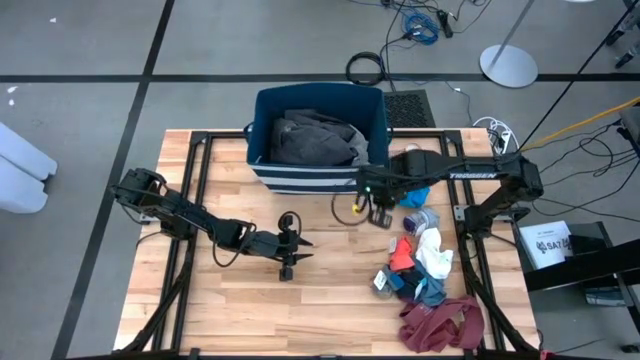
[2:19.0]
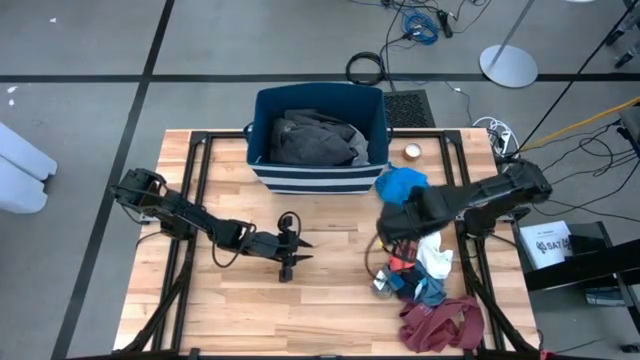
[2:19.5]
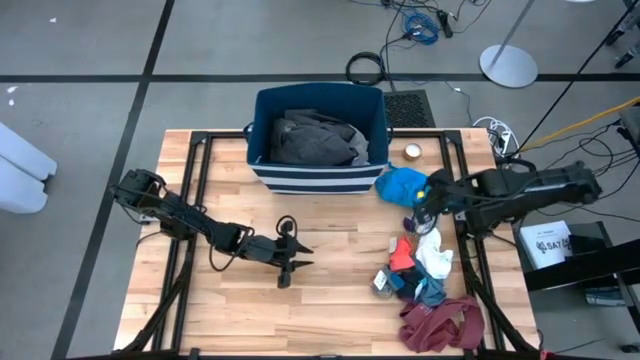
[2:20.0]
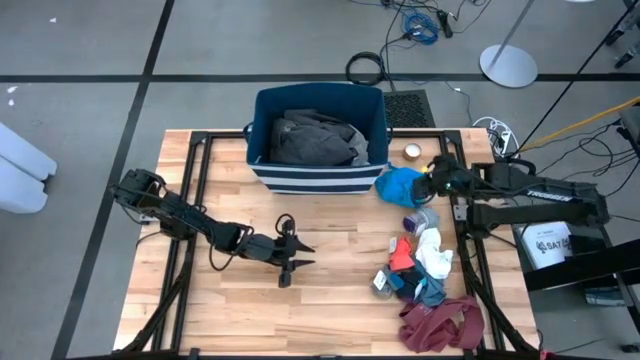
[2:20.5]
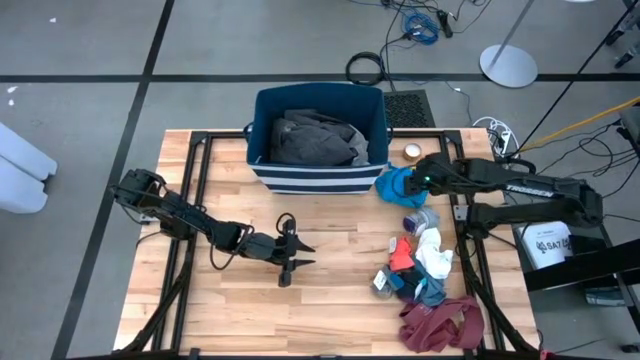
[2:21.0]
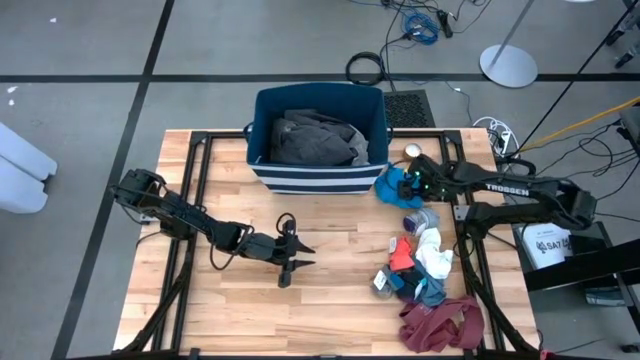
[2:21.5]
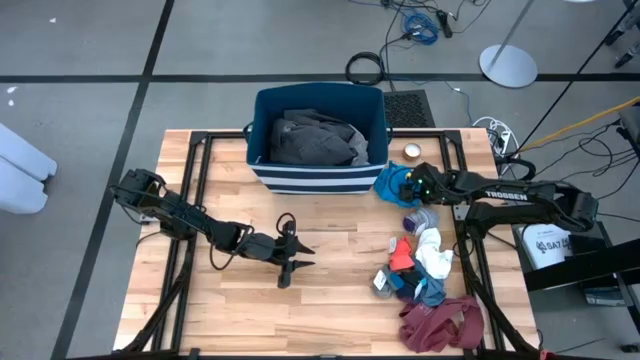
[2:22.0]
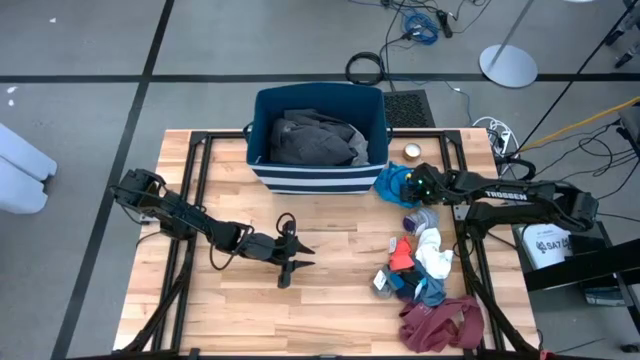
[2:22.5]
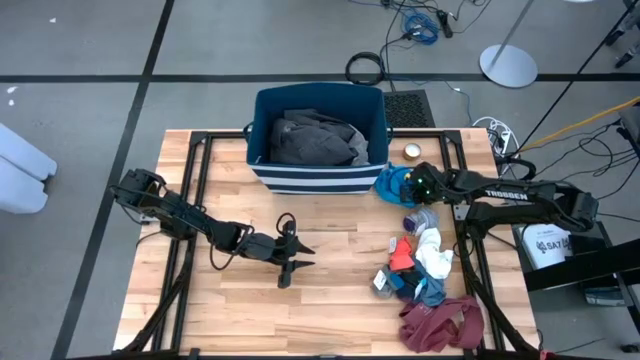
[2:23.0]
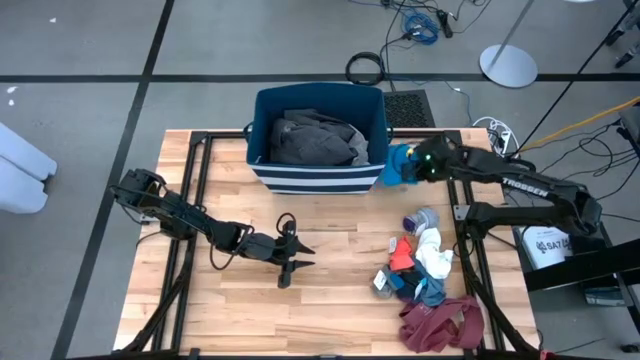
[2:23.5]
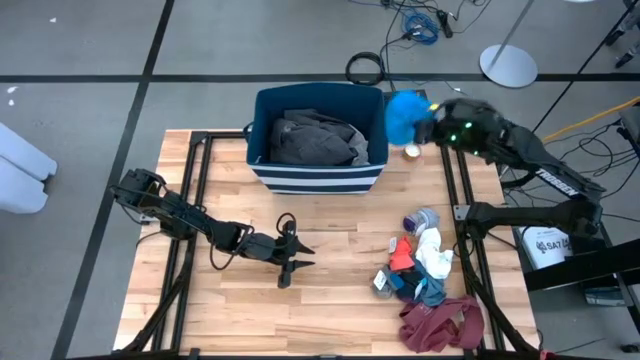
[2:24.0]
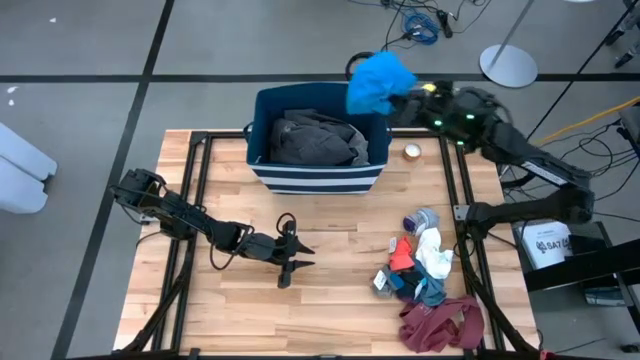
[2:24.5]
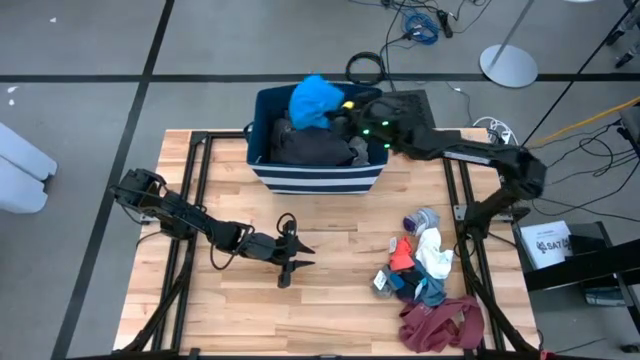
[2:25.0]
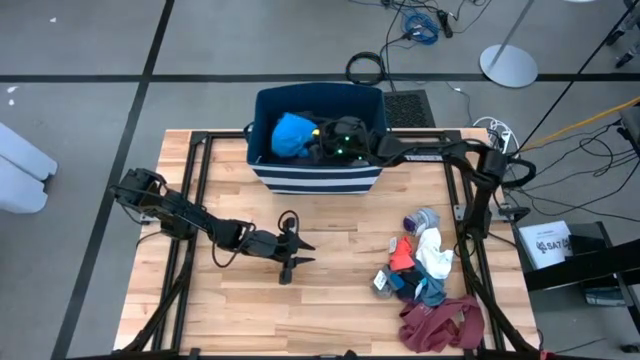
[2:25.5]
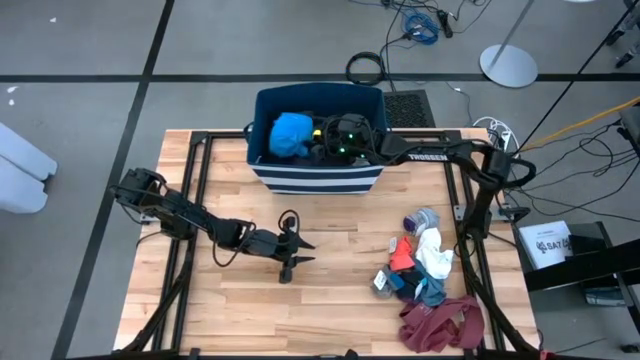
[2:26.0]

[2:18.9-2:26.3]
Task: Sort clothes
Put the blue short into the blue laundry bin

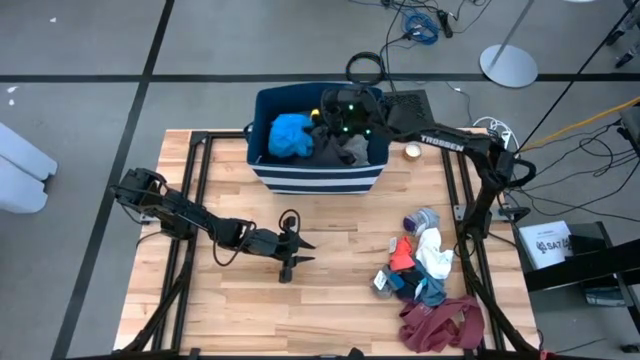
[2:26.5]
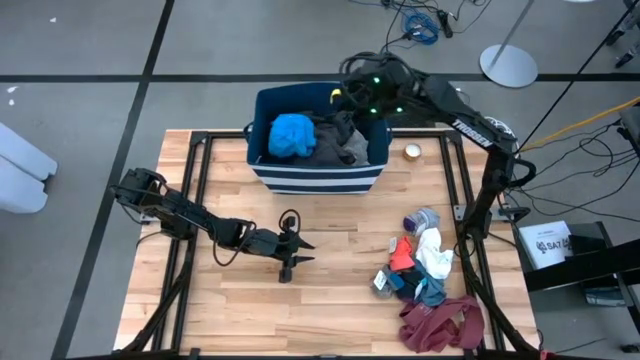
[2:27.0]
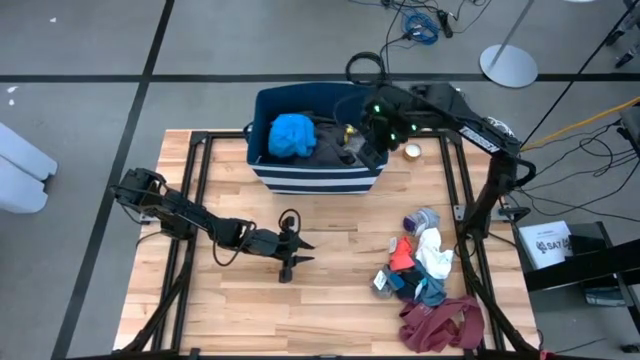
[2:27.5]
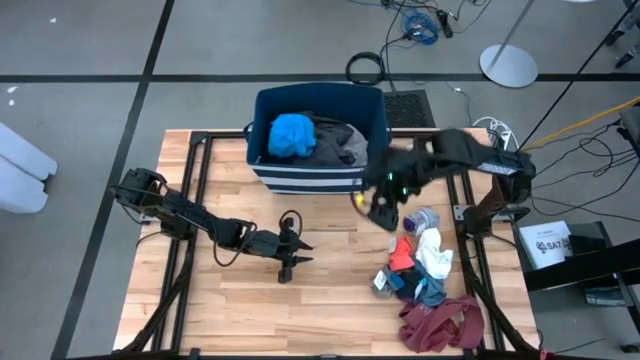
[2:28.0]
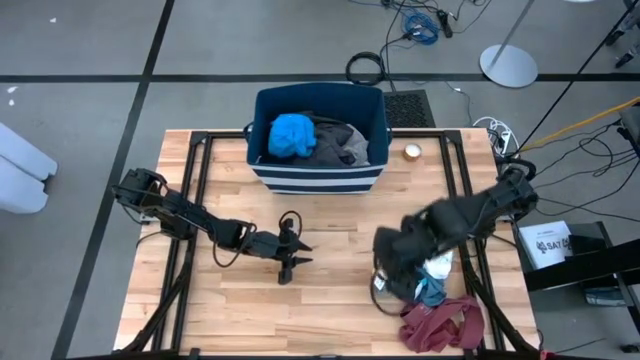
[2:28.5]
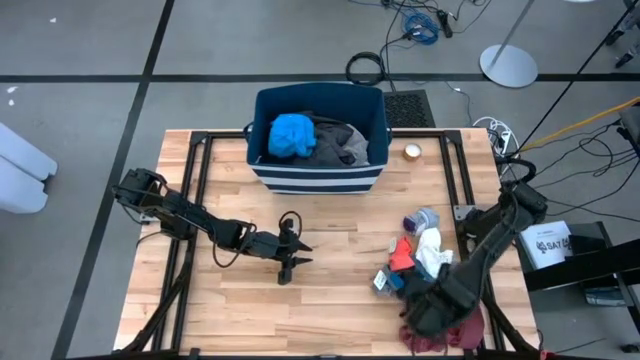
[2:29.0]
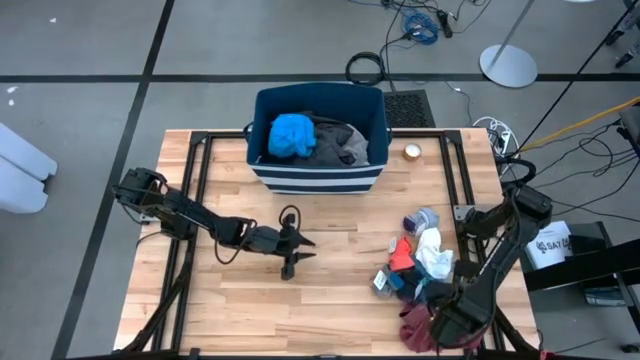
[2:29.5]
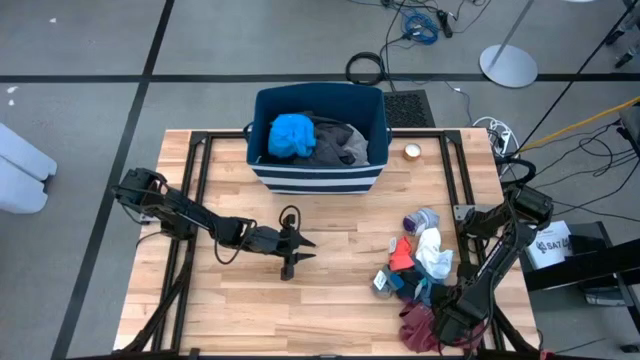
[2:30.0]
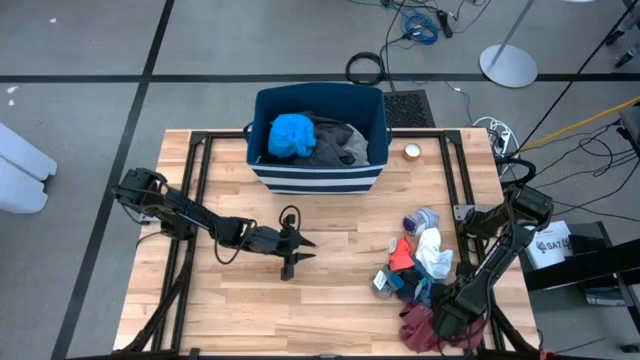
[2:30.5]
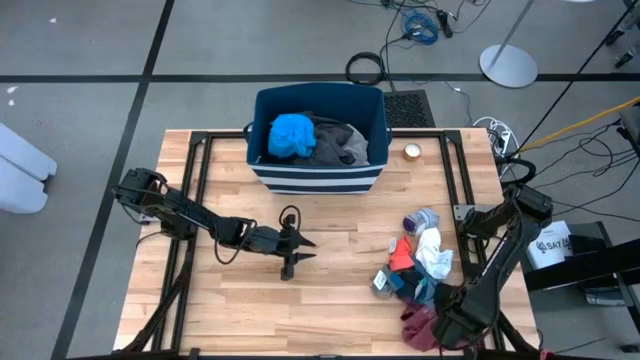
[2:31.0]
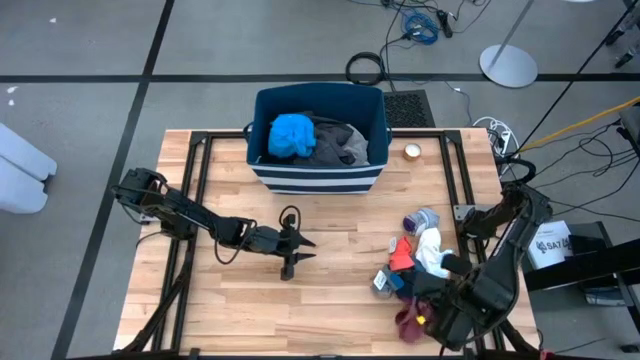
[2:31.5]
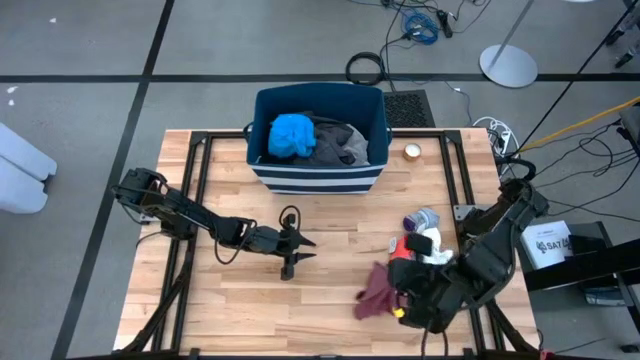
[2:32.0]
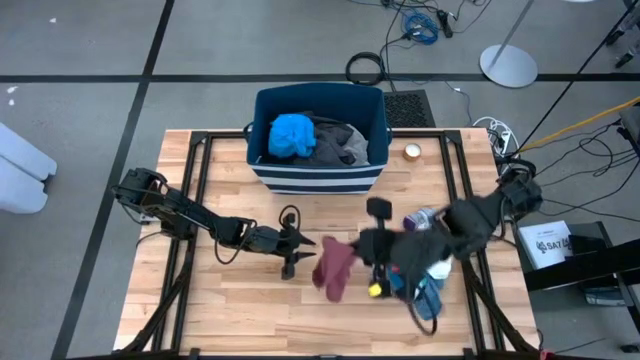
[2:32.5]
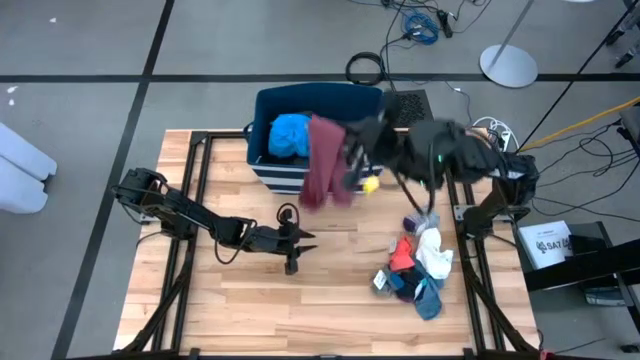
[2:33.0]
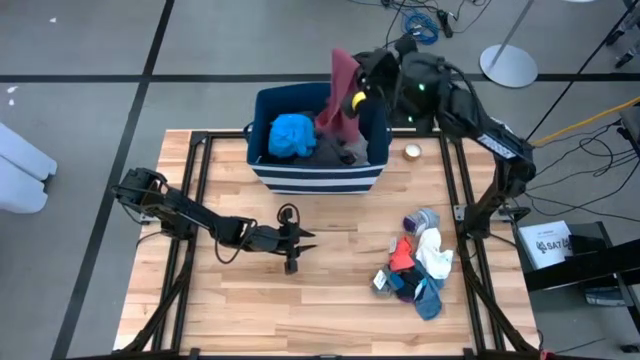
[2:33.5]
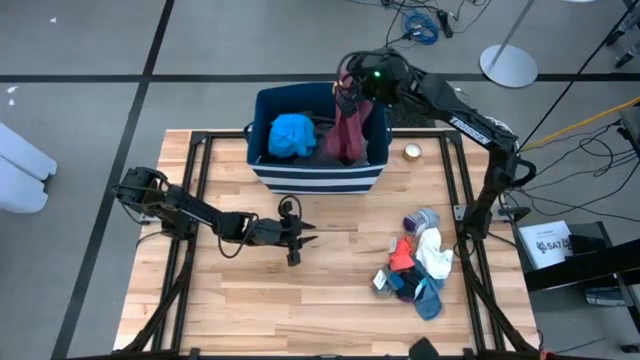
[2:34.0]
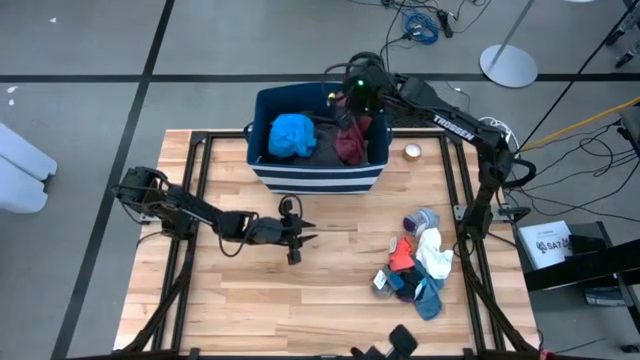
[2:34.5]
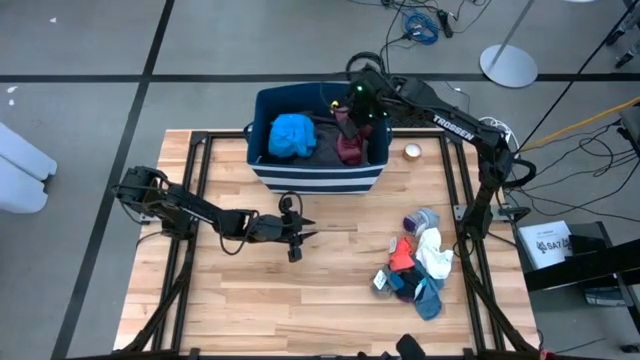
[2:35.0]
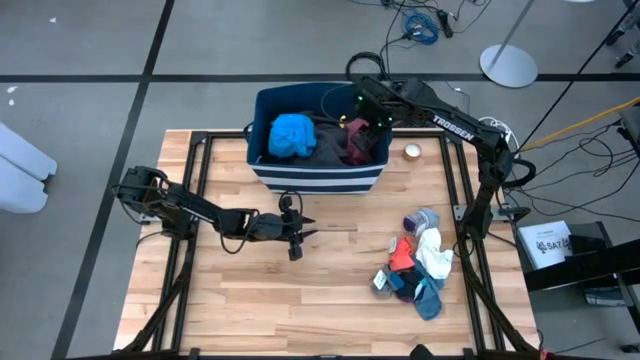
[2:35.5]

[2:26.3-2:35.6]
Put the red underwear into the blue laundry bin

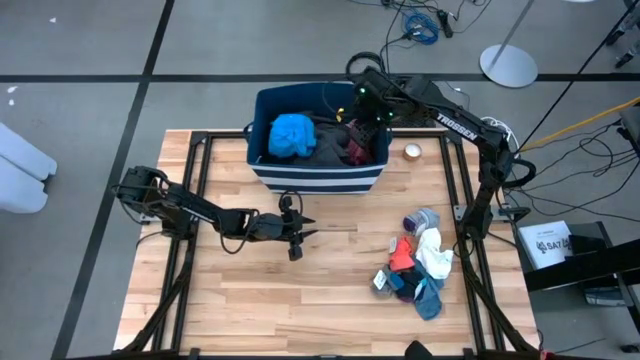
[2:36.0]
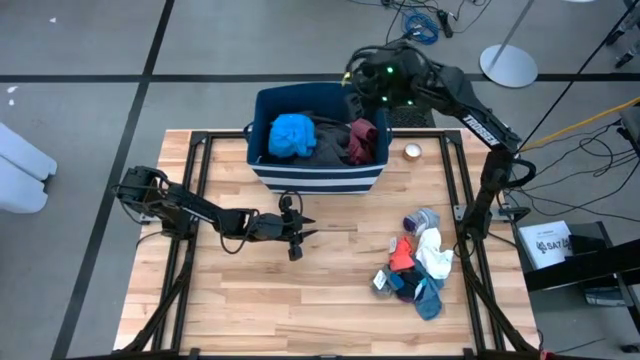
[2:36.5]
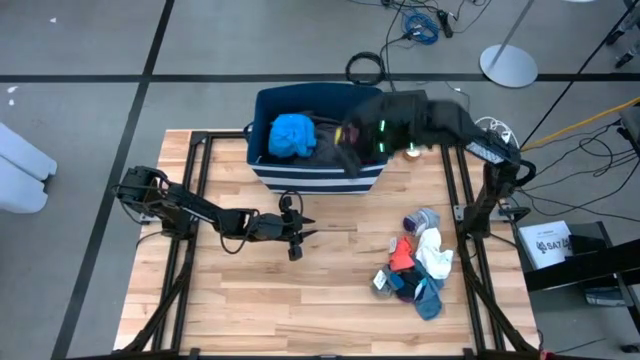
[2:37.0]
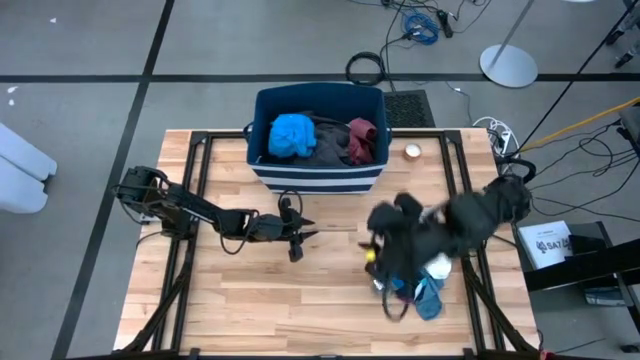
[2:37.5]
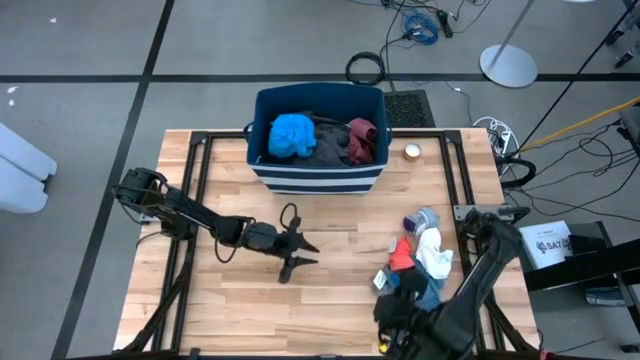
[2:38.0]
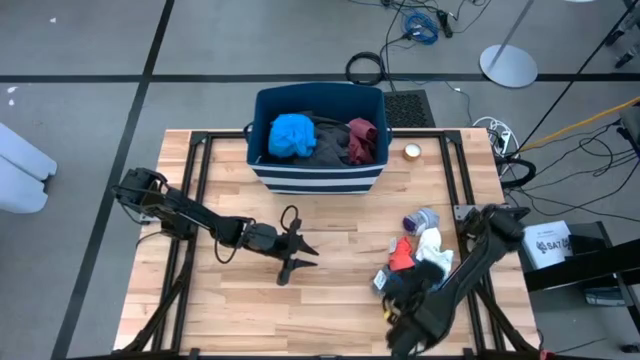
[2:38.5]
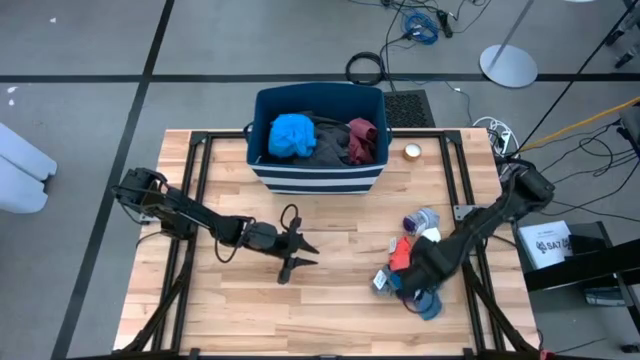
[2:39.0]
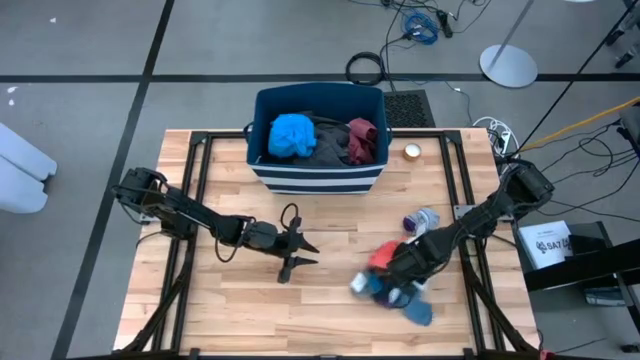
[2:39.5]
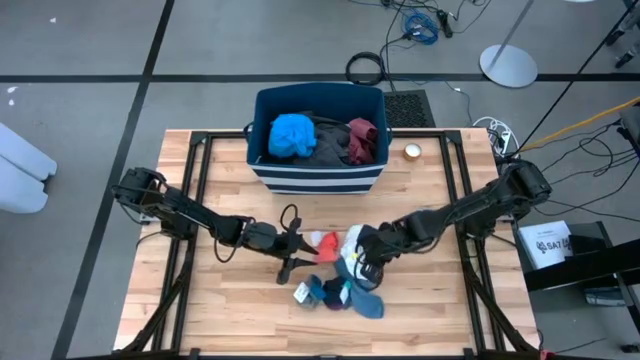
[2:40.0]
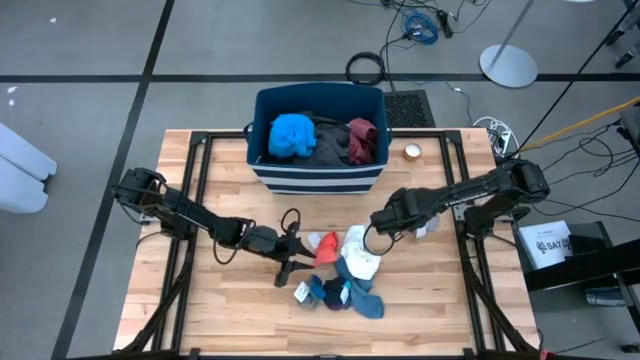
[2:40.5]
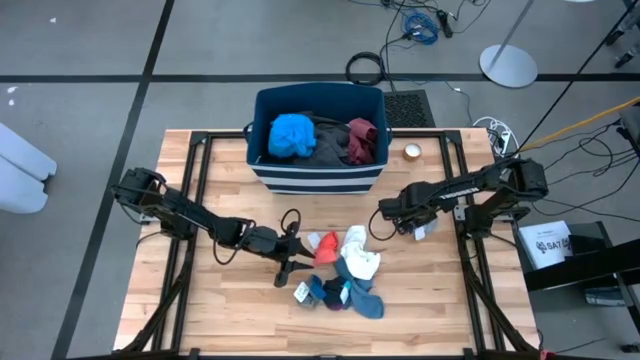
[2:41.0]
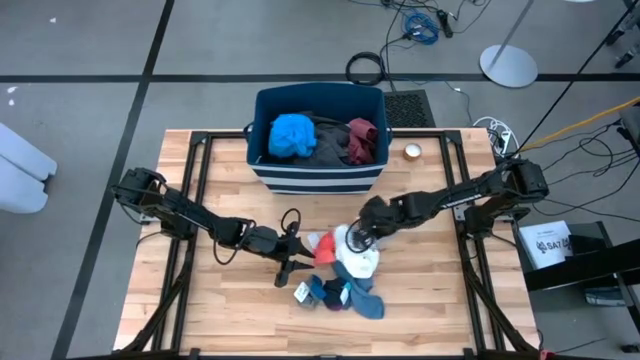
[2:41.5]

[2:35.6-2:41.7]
Move all clothes to the center of the table
